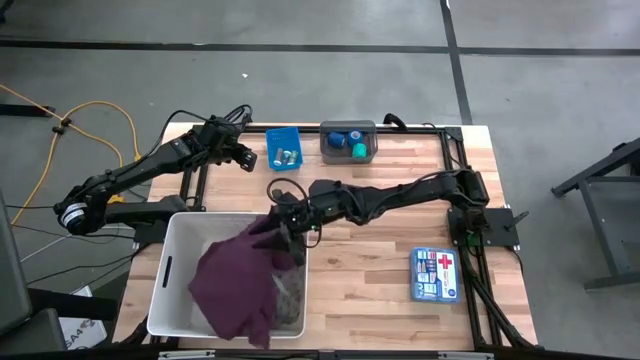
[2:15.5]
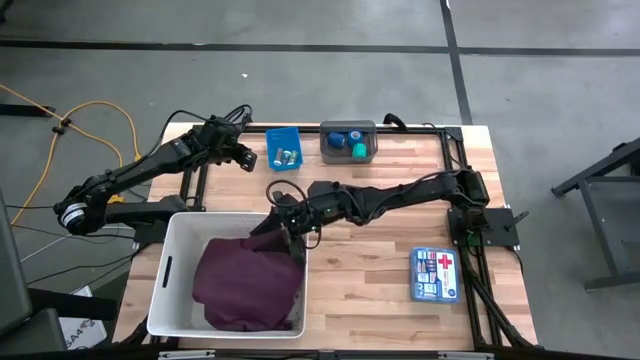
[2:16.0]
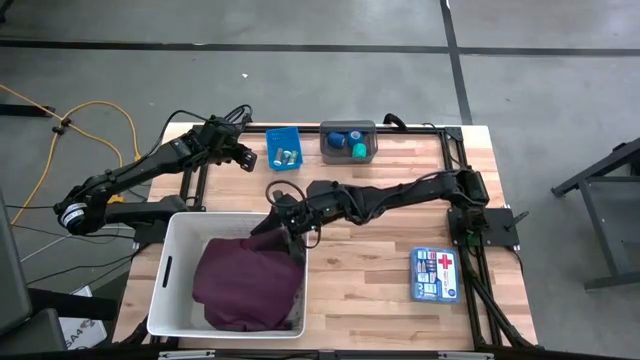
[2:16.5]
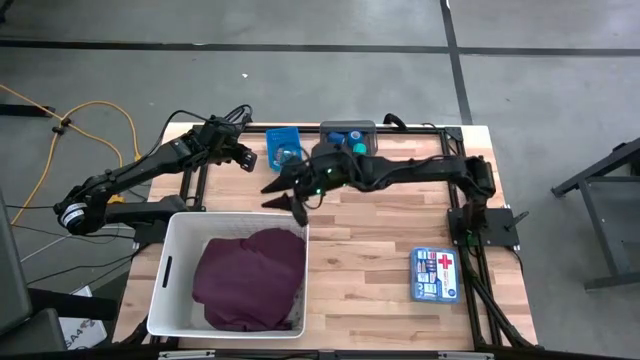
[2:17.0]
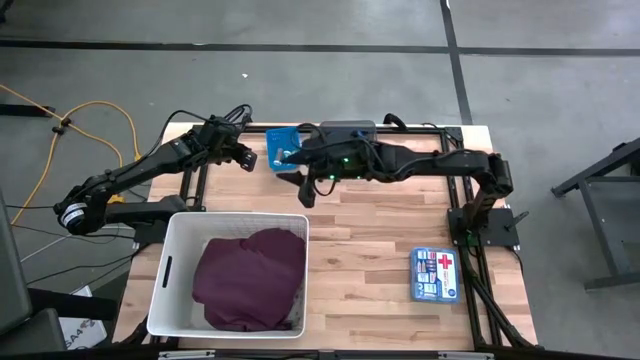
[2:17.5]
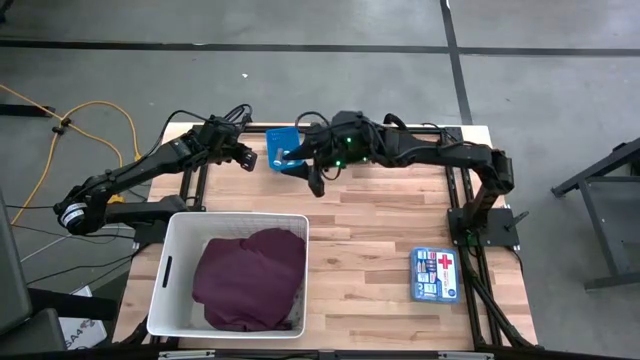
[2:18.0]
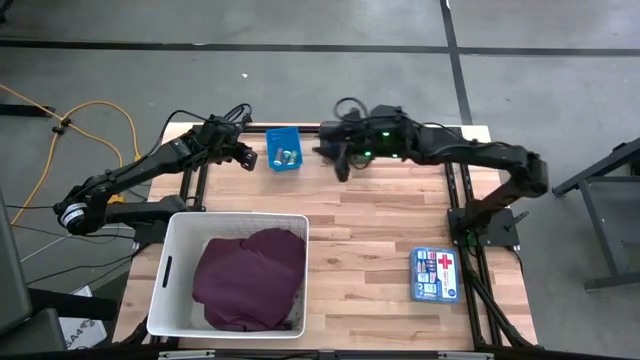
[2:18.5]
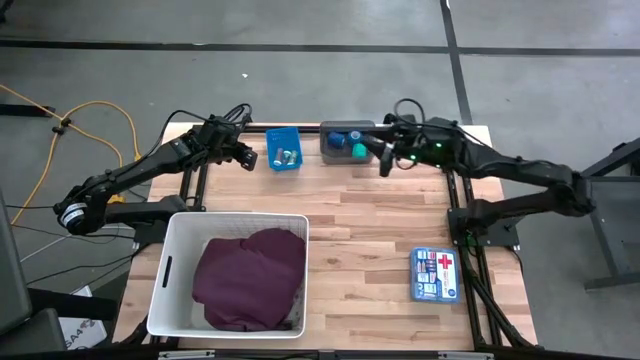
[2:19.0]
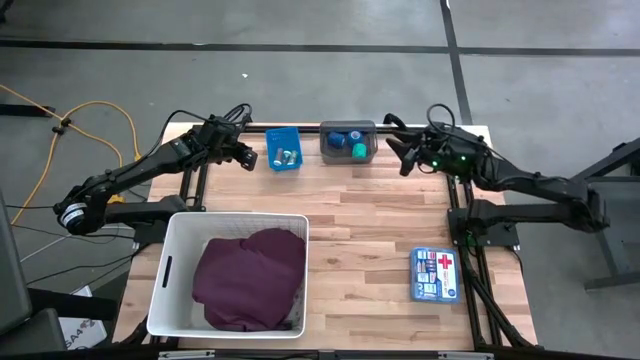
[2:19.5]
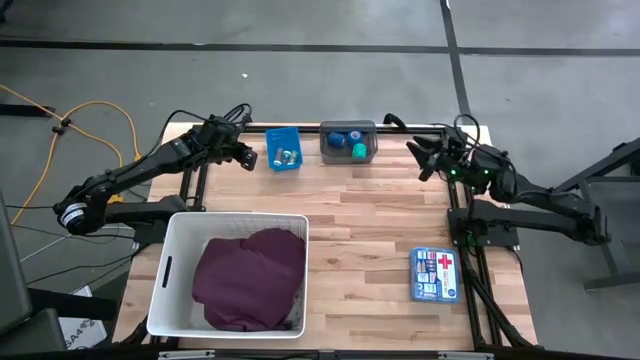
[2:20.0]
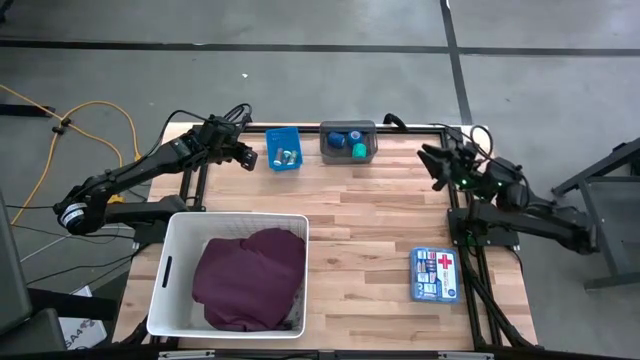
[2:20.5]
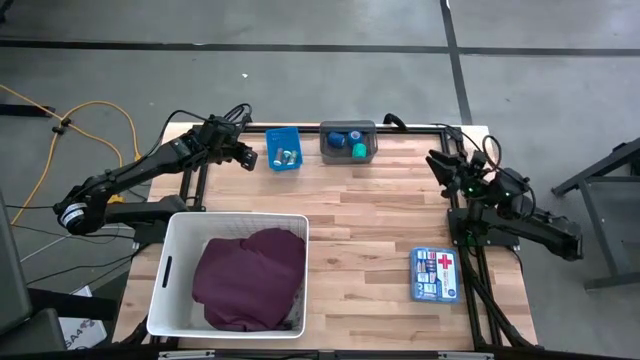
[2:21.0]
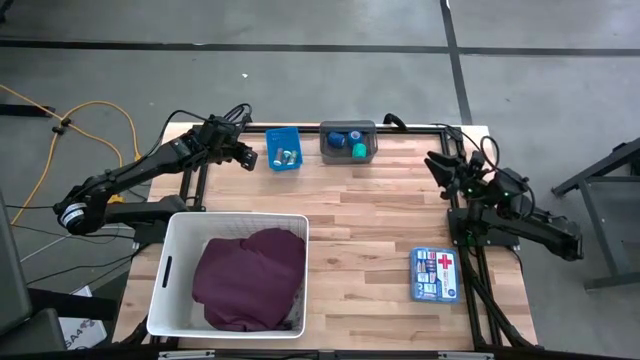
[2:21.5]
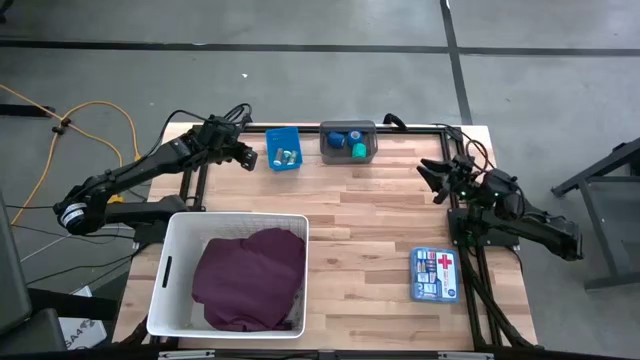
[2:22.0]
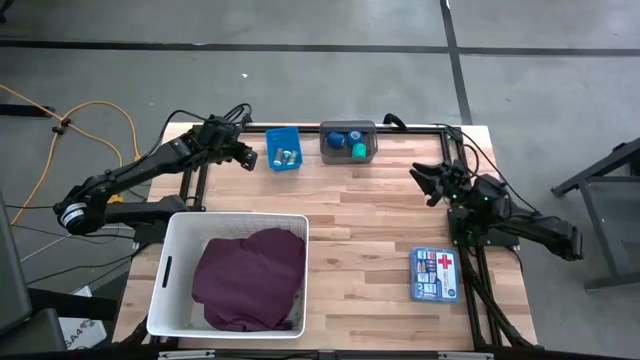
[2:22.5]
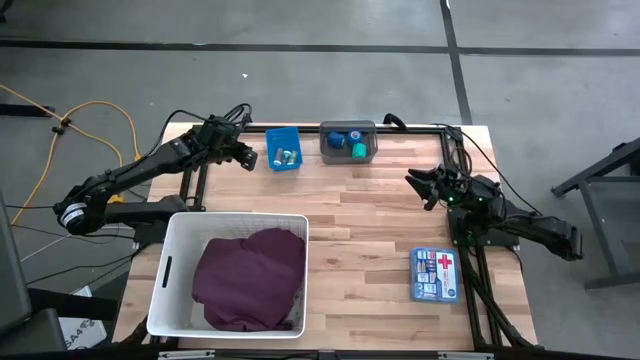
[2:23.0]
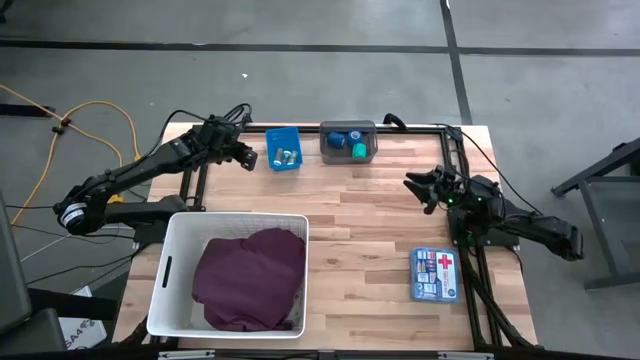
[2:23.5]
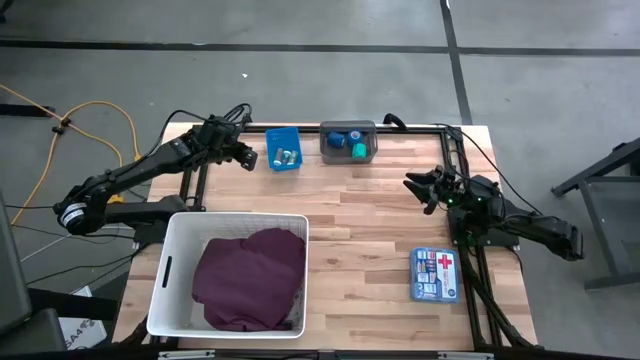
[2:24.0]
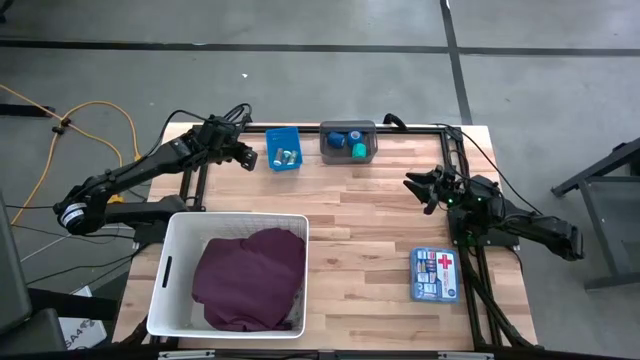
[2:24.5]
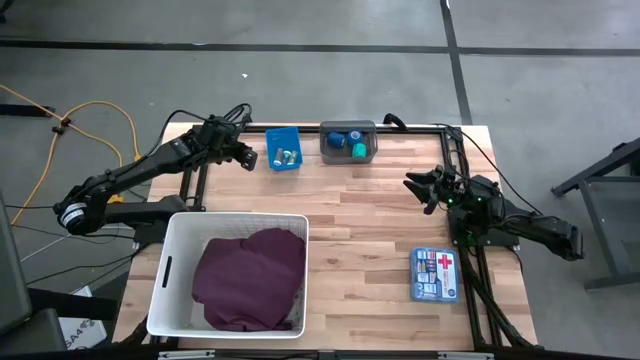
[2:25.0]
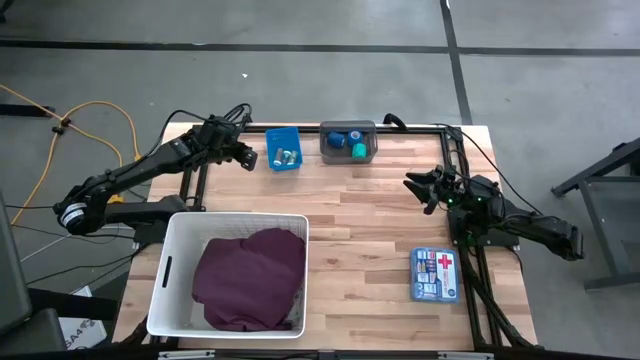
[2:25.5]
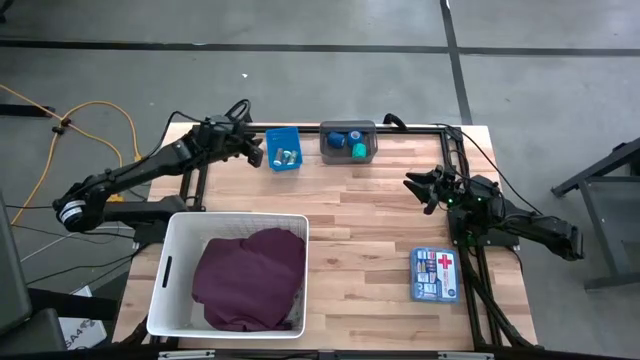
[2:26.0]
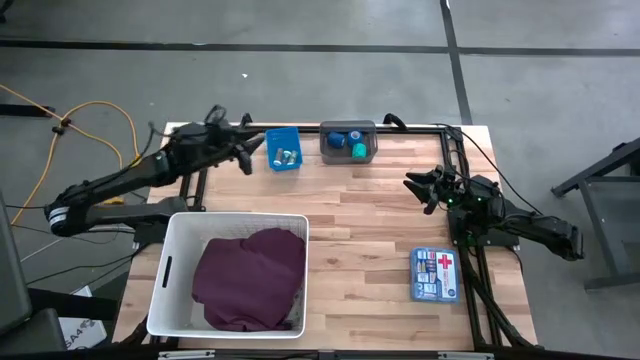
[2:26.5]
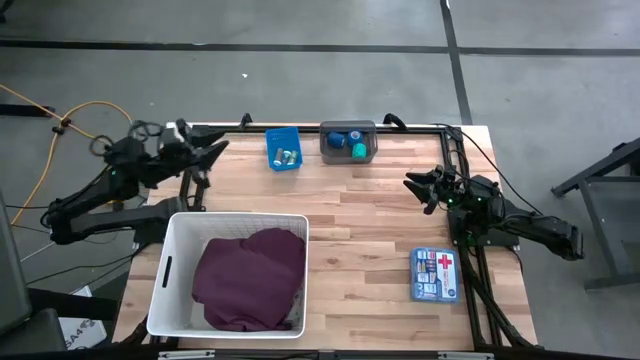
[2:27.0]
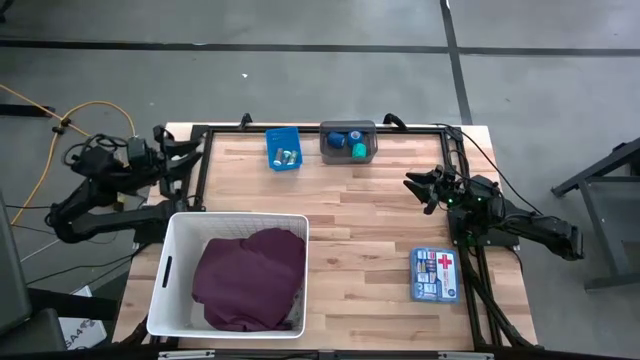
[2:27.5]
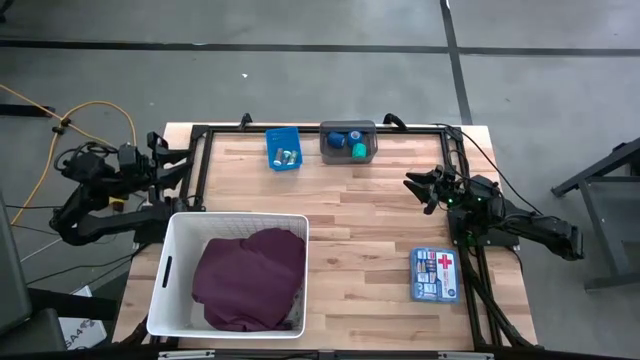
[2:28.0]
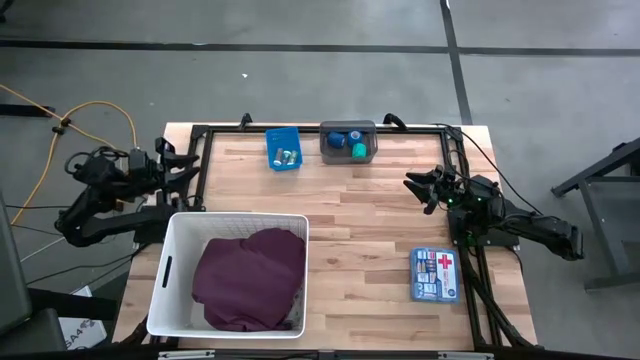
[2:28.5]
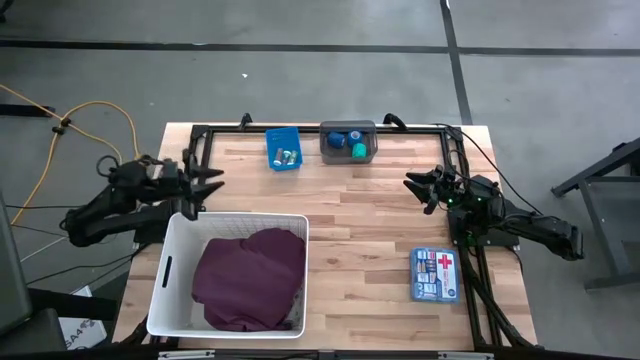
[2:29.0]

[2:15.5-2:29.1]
Task: Pick & place medical supplies in basket/bin
Return to Home Position

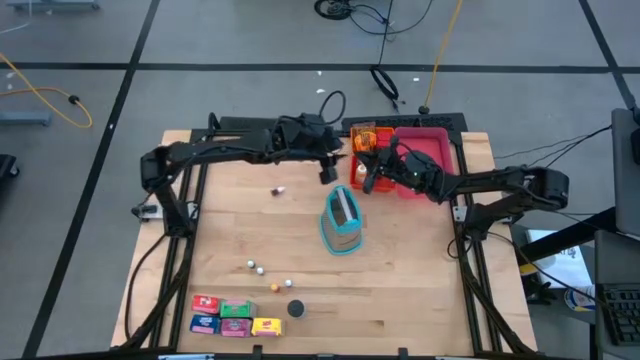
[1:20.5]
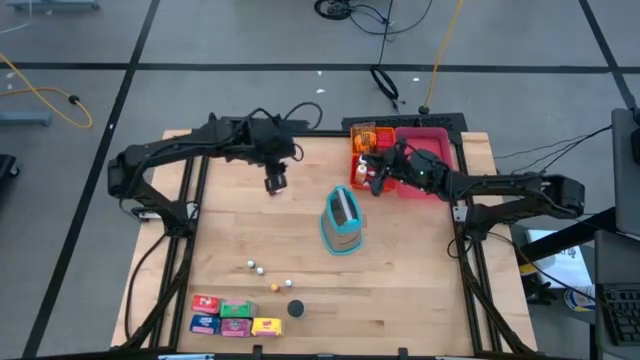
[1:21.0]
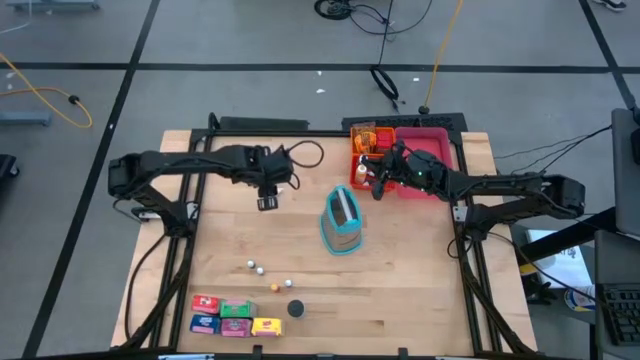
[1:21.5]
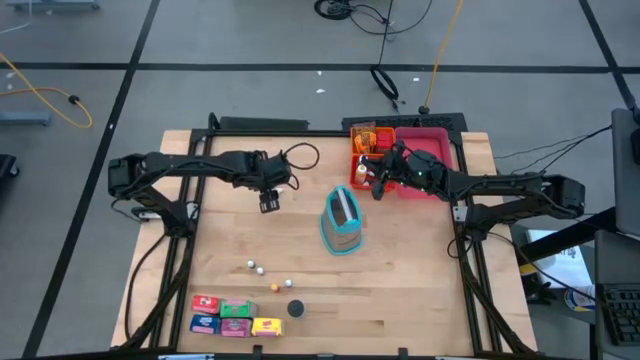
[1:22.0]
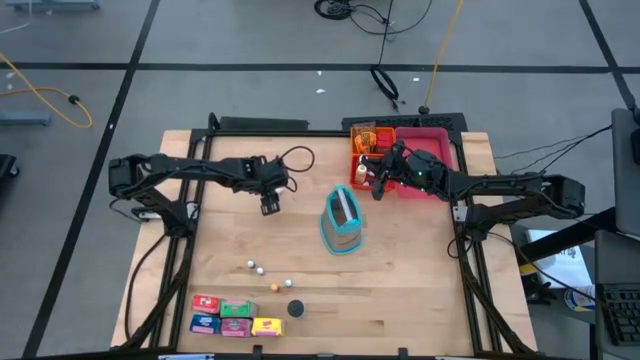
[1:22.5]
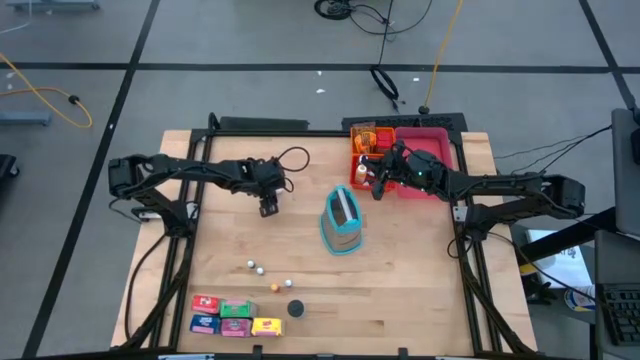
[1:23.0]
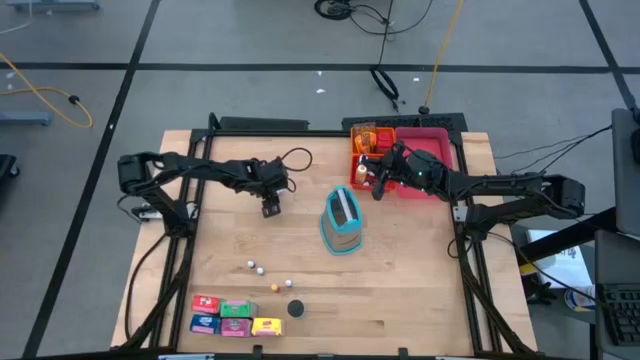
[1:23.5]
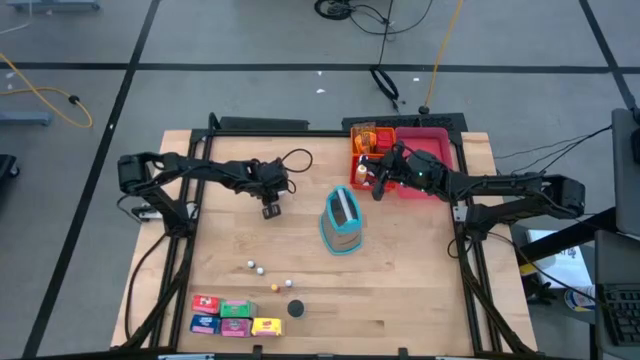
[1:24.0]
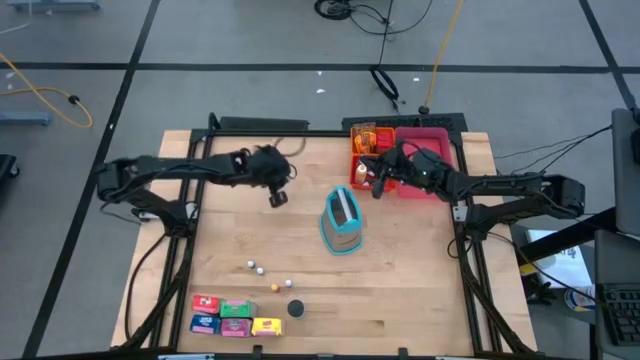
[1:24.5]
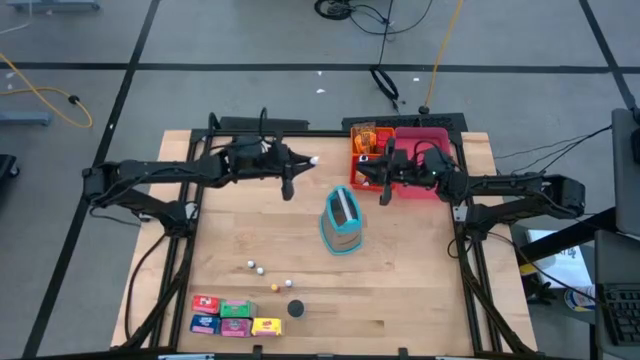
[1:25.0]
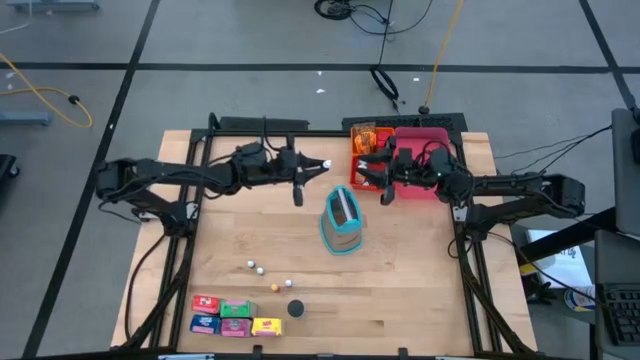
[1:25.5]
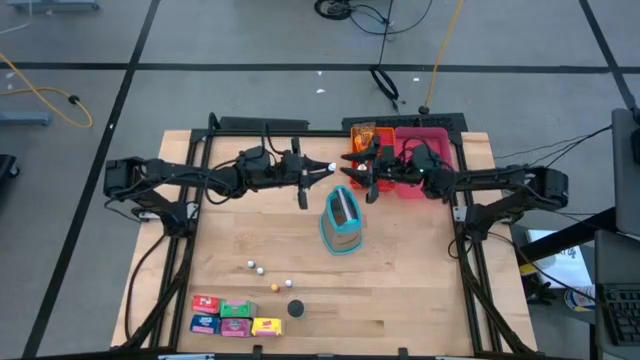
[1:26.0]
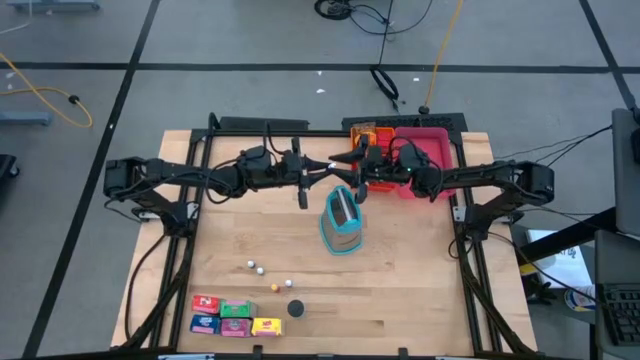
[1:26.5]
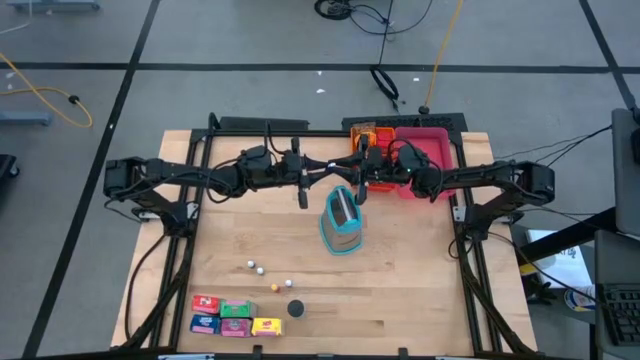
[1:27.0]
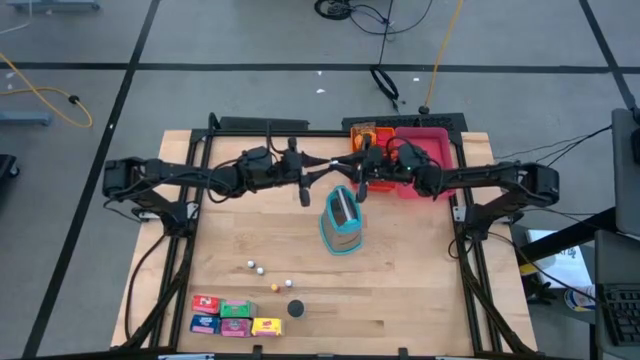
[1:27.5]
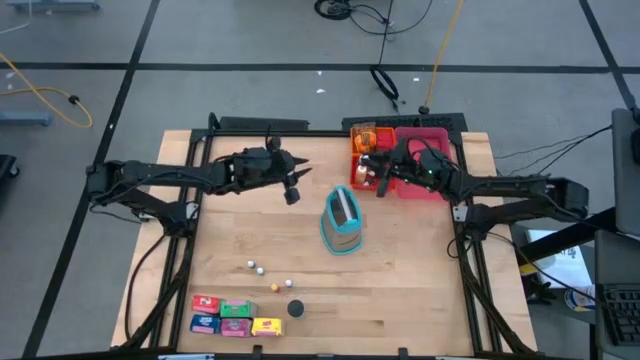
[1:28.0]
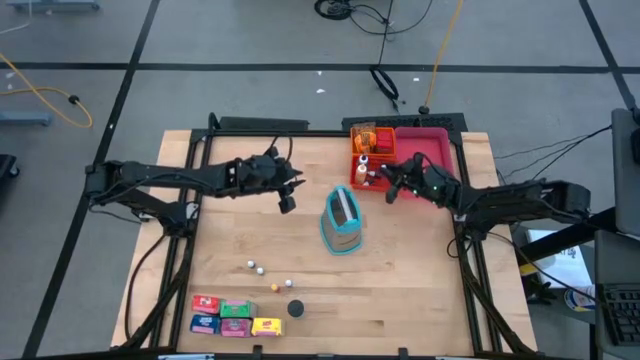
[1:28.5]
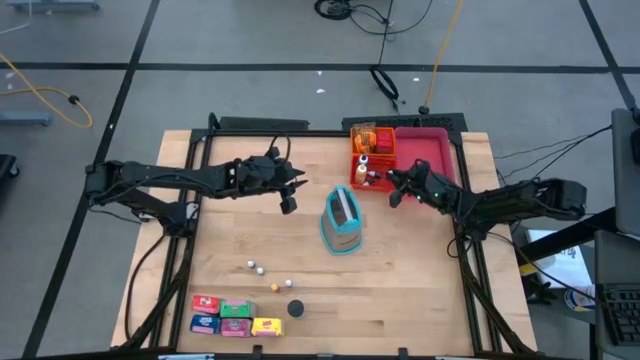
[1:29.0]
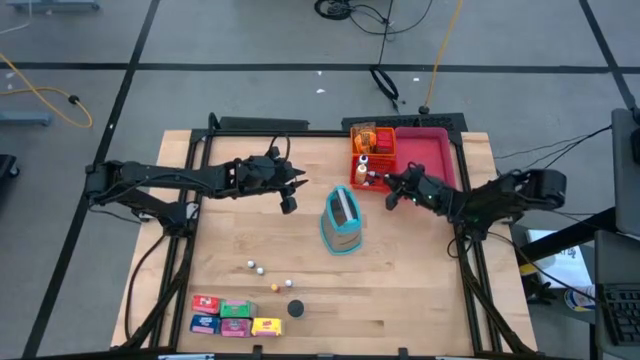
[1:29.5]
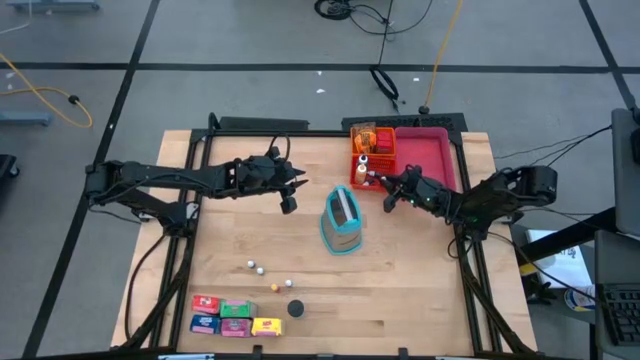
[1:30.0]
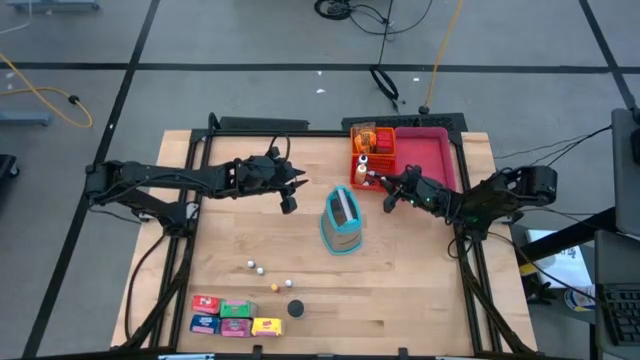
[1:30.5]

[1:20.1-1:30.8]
Task: Pick & Place Kitchen Items
Put the small orange food coloring bottle into the red bin
